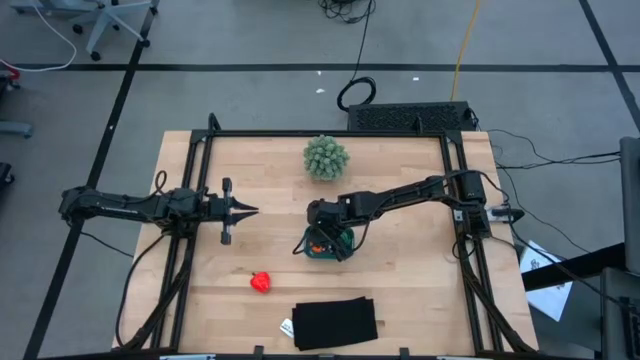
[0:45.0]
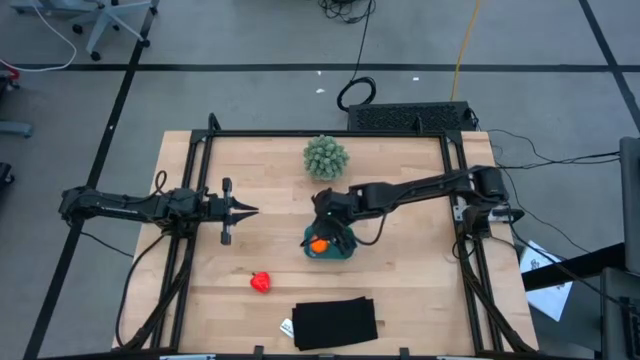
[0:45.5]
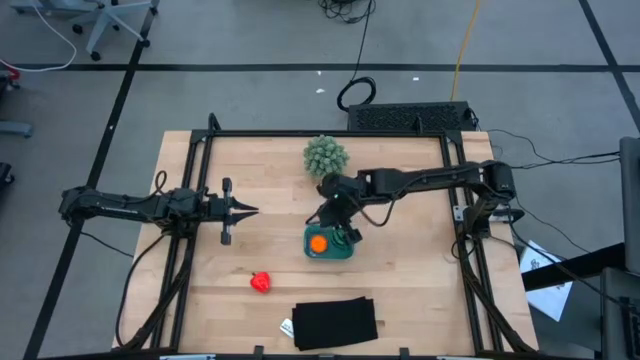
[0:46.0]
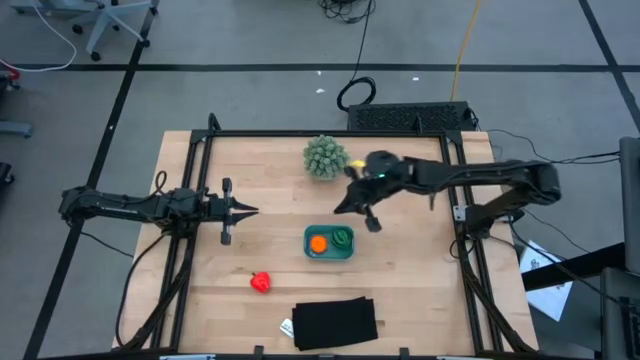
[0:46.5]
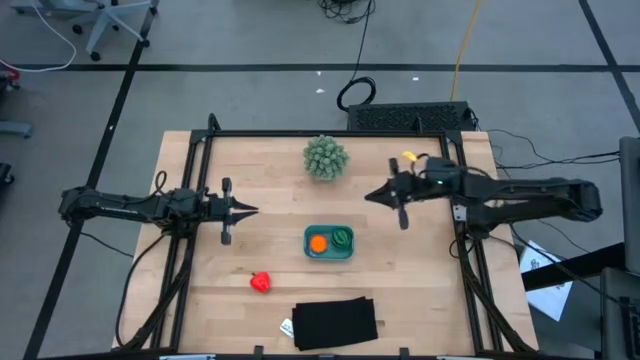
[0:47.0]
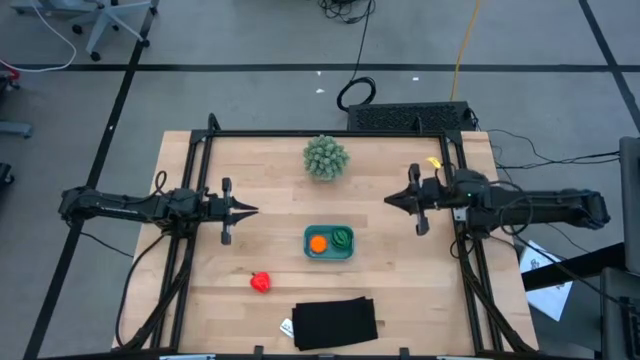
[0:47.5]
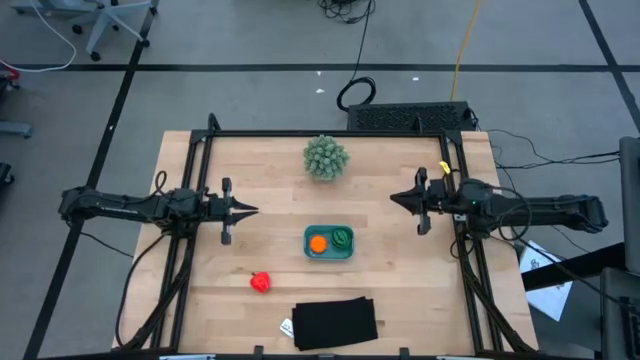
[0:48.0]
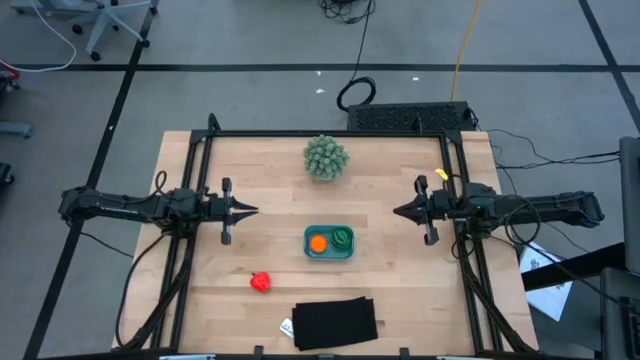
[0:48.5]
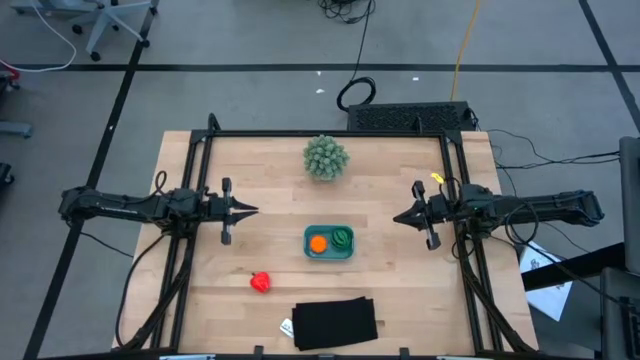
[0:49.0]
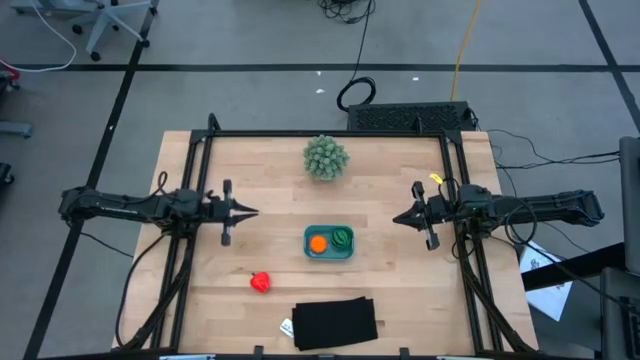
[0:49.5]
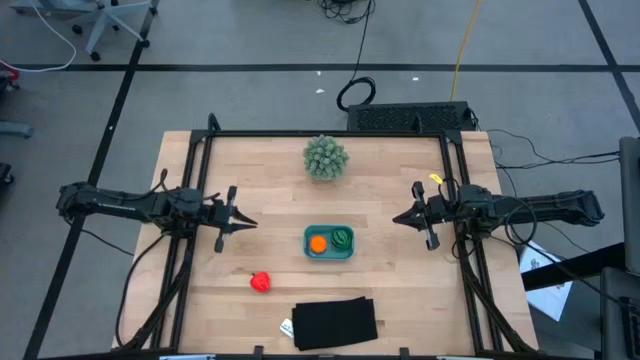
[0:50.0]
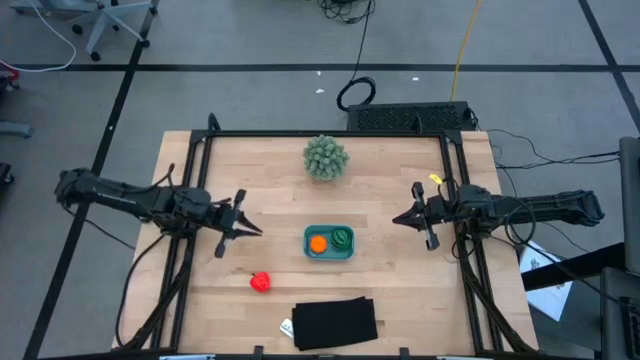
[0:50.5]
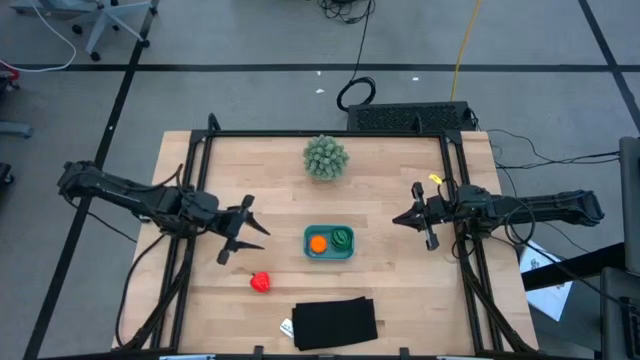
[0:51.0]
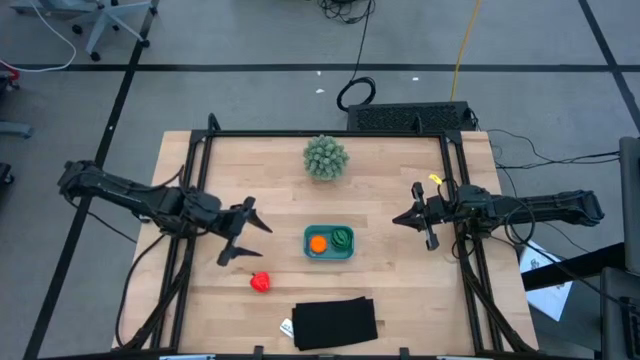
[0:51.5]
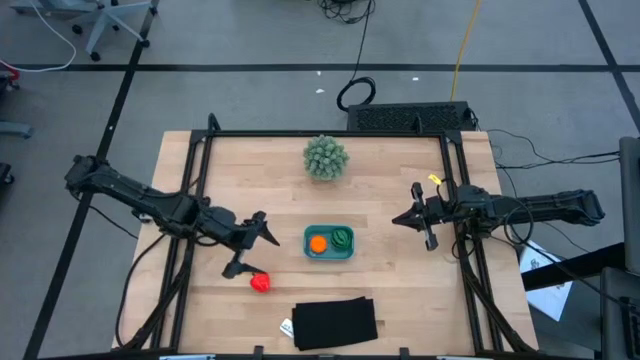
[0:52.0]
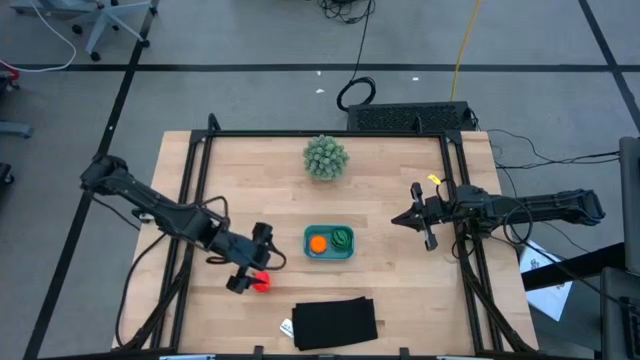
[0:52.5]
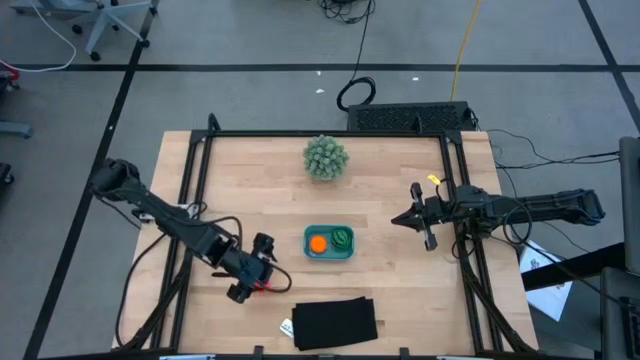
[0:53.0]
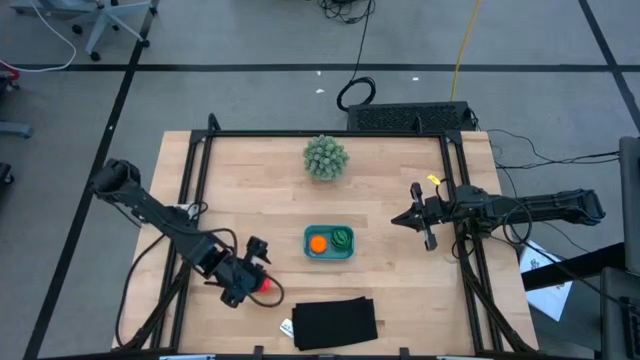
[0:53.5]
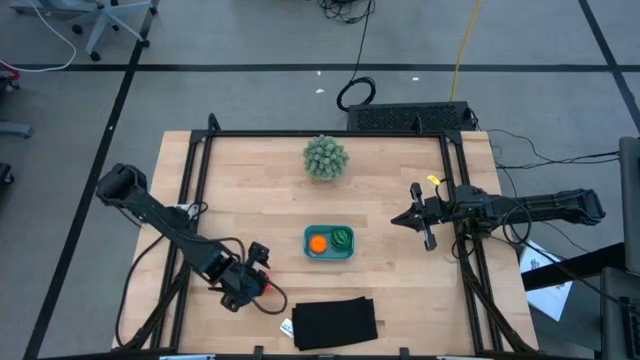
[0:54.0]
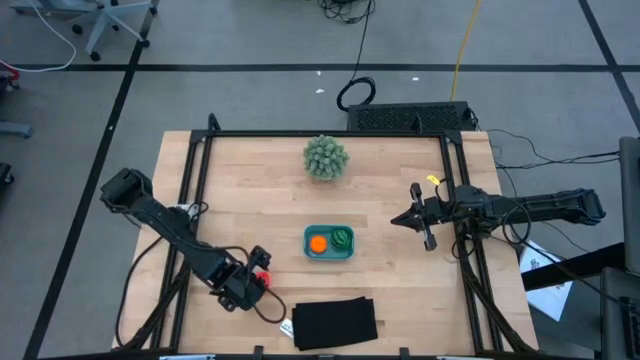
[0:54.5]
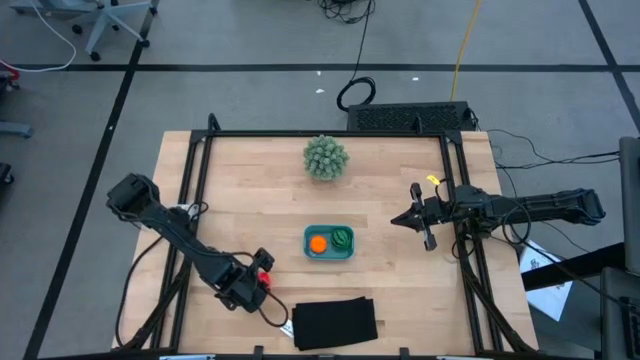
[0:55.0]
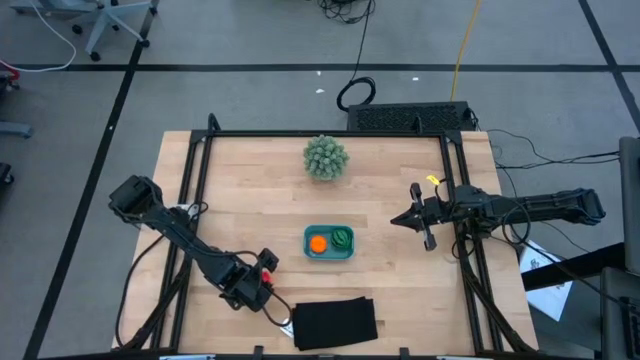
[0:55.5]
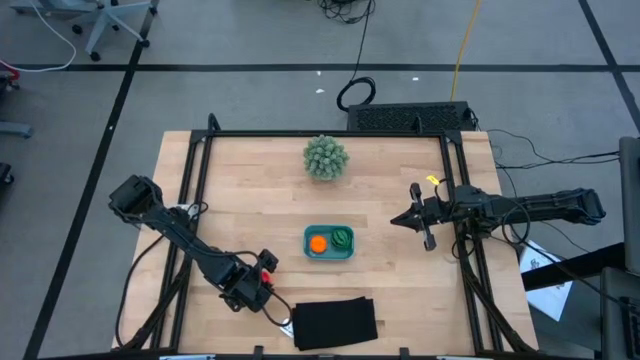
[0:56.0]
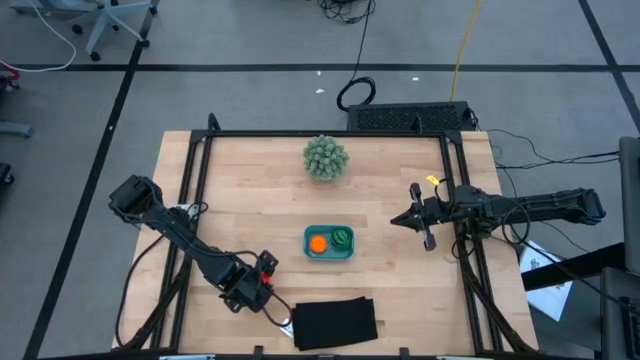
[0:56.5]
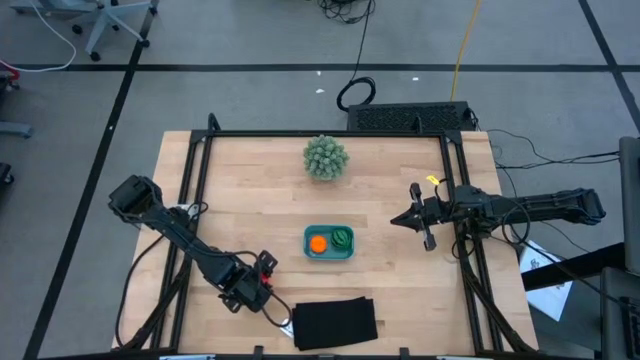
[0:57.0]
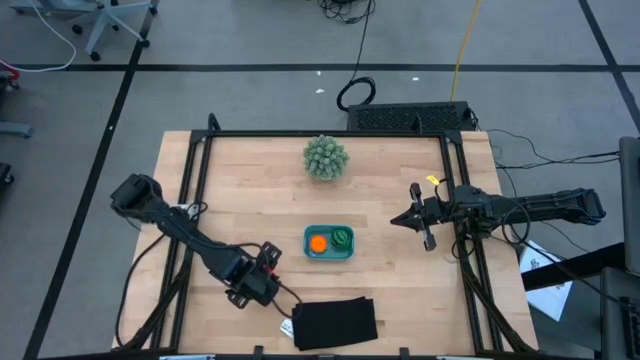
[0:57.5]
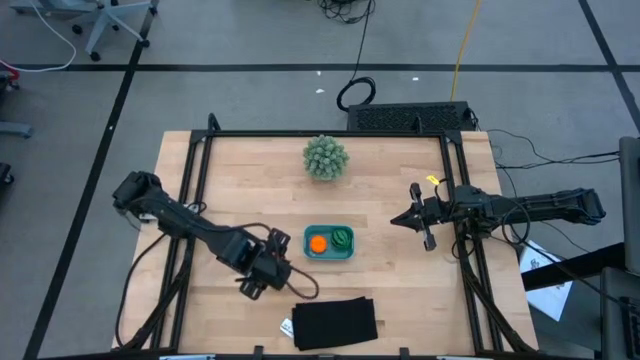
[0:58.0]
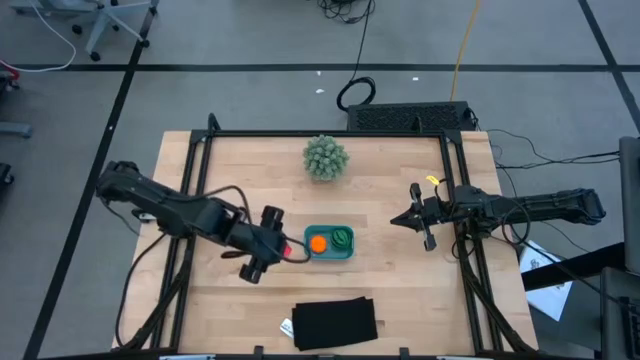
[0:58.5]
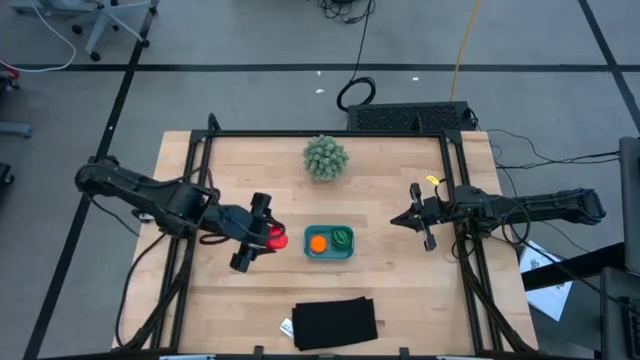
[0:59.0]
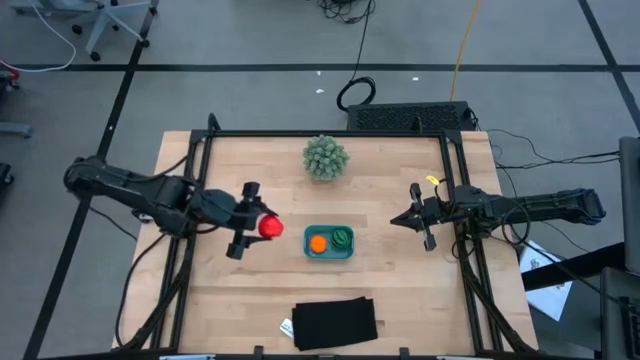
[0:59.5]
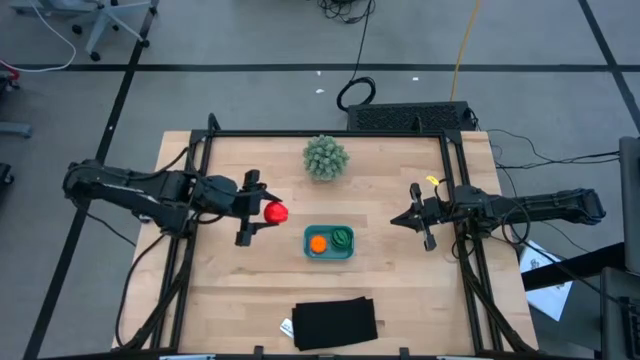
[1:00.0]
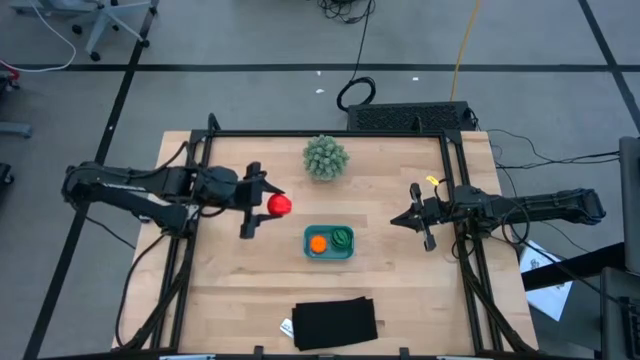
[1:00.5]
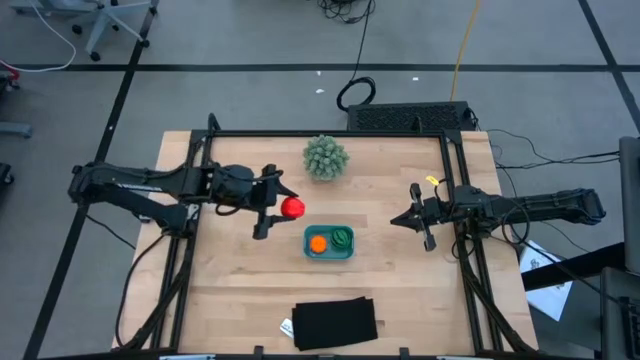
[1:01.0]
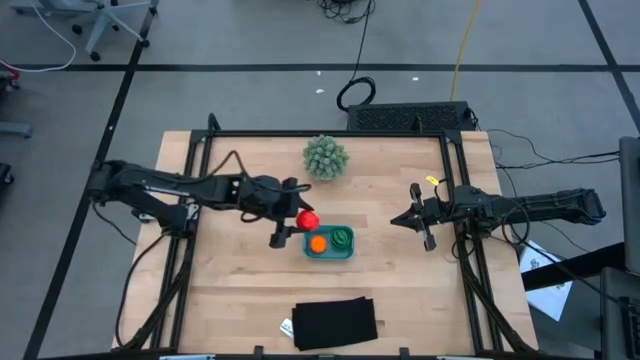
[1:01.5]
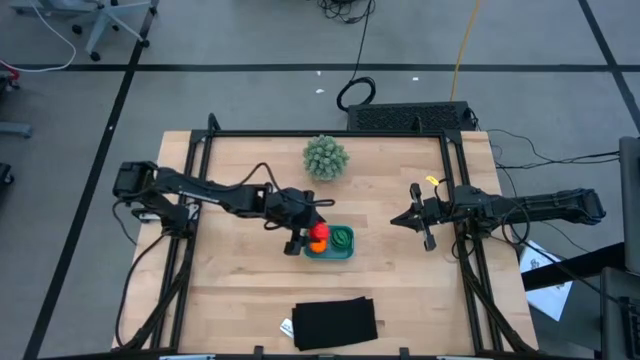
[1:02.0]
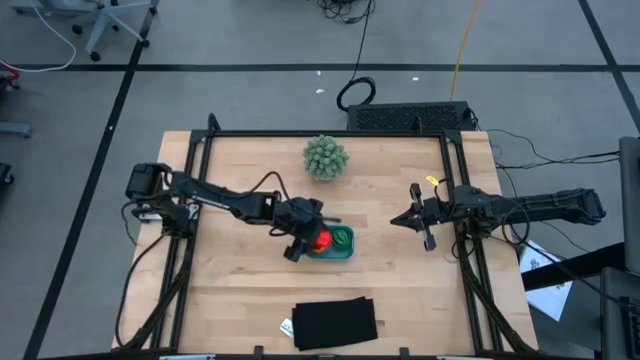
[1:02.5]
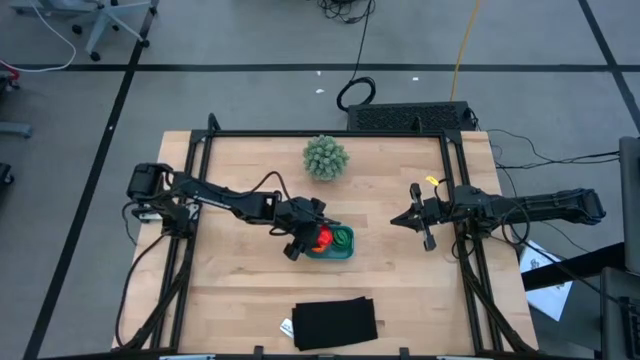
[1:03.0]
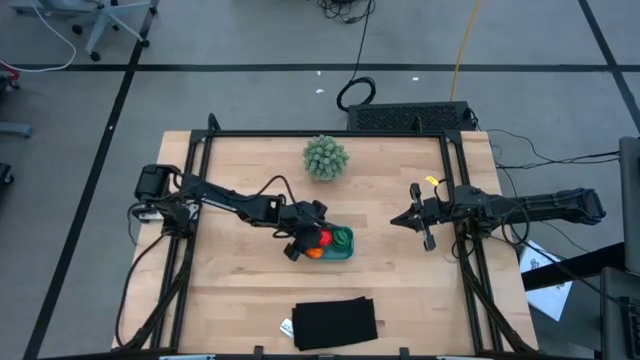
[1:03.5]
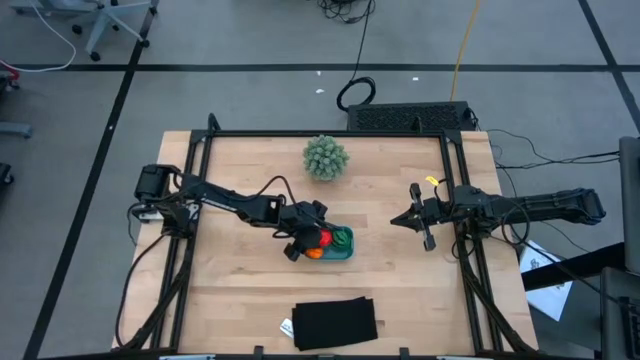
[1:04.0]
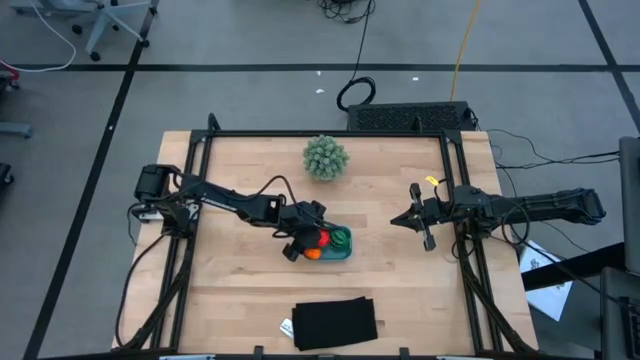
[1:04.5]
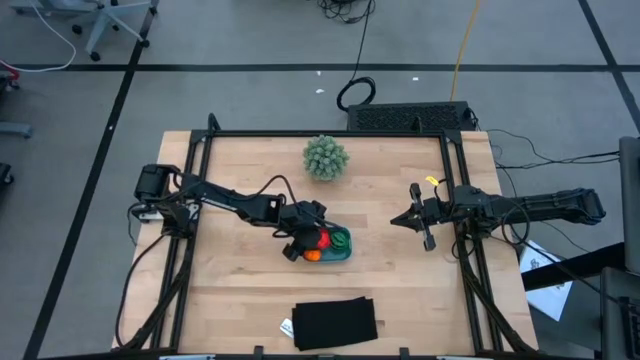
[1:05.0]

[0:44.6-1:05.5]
Task: Pick and placing Produce into tupperware
Put the apple toy into the bin
